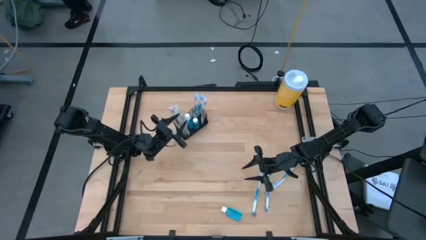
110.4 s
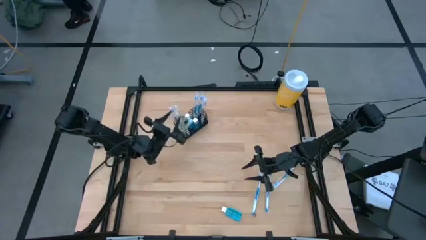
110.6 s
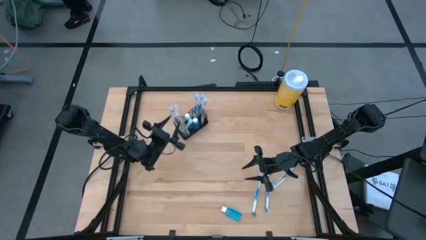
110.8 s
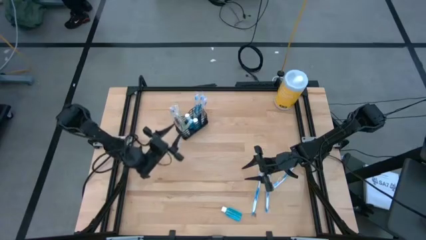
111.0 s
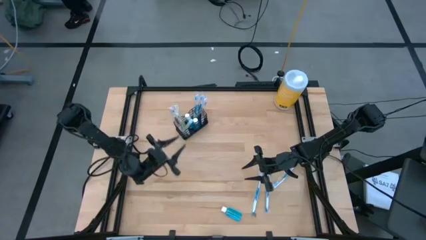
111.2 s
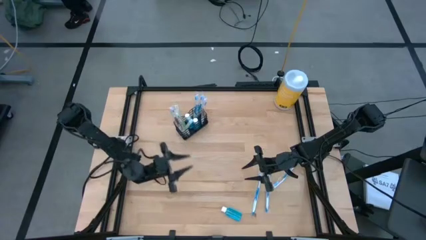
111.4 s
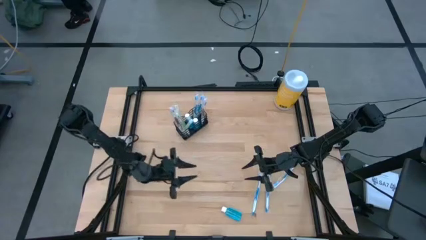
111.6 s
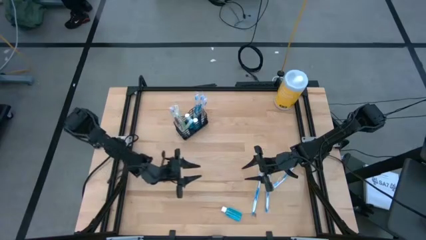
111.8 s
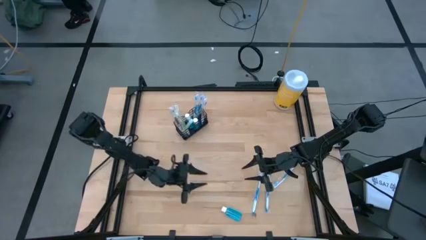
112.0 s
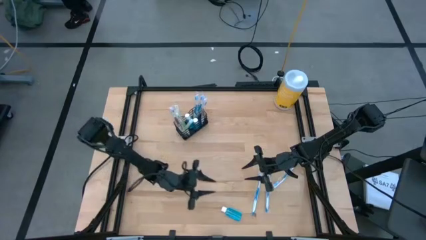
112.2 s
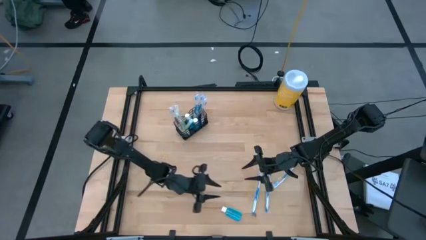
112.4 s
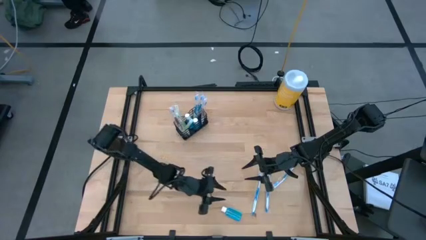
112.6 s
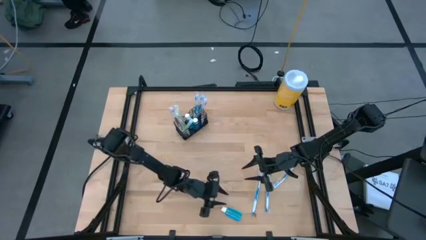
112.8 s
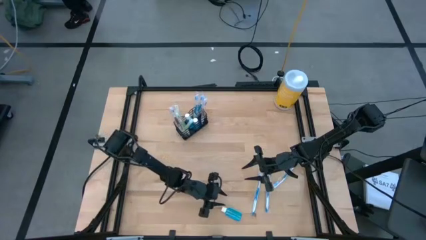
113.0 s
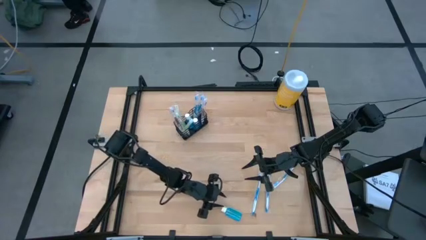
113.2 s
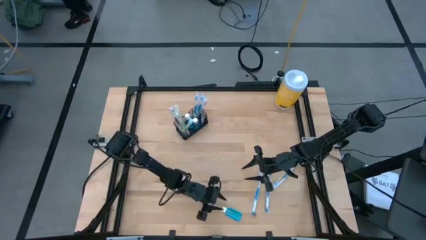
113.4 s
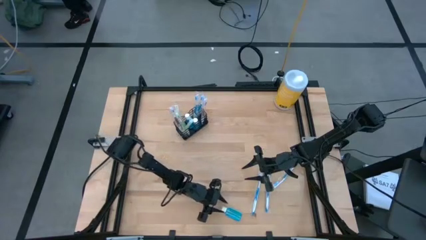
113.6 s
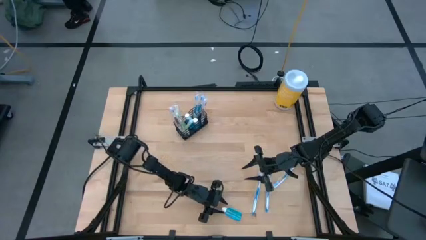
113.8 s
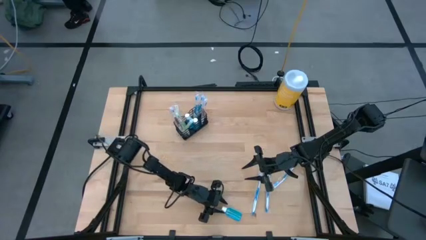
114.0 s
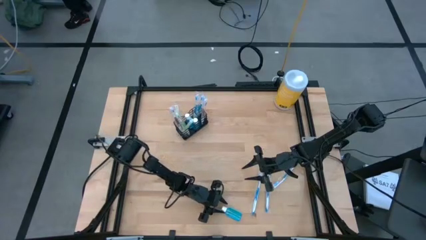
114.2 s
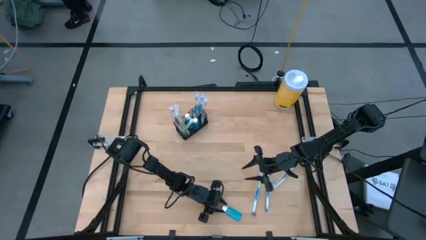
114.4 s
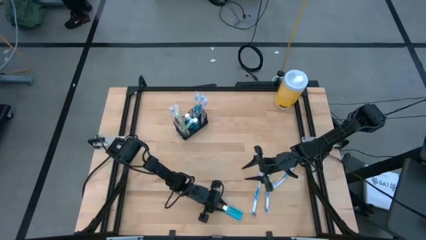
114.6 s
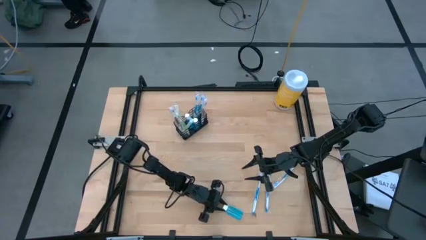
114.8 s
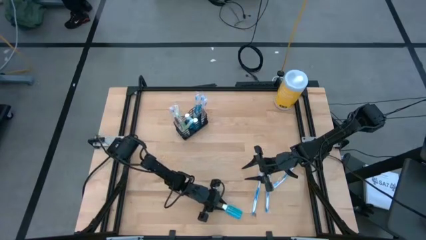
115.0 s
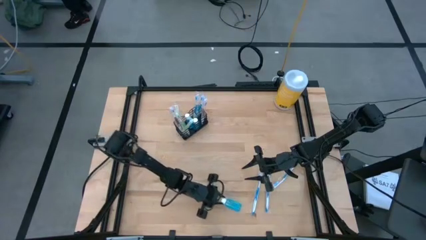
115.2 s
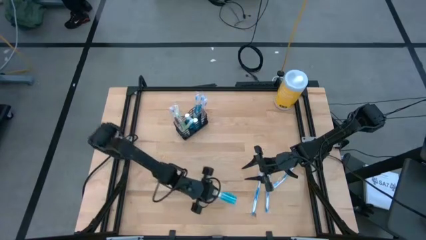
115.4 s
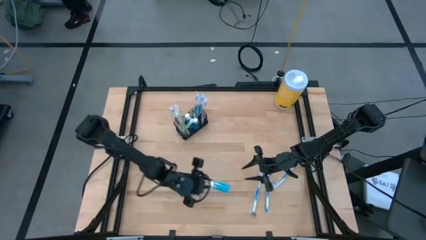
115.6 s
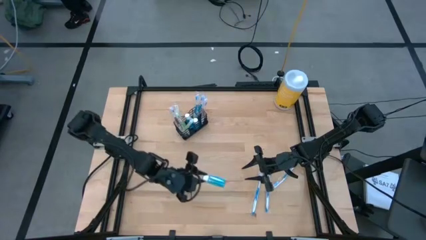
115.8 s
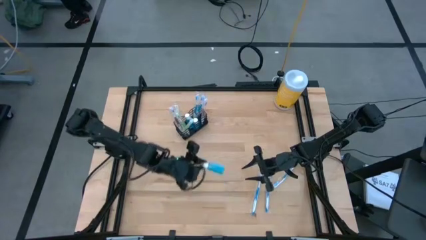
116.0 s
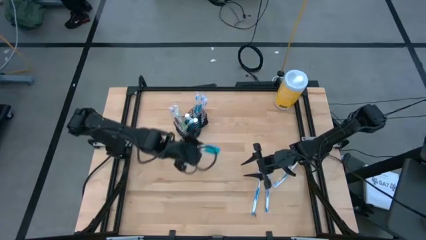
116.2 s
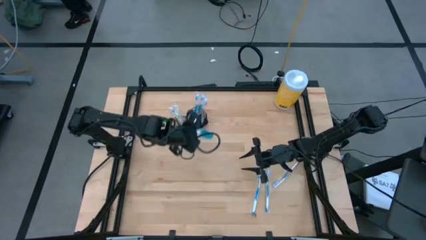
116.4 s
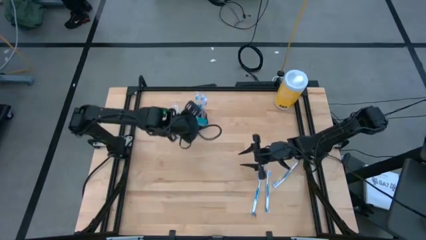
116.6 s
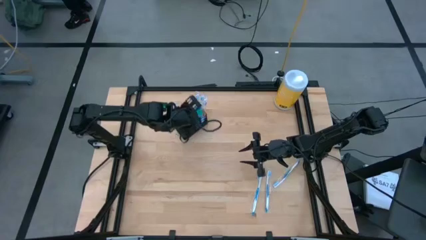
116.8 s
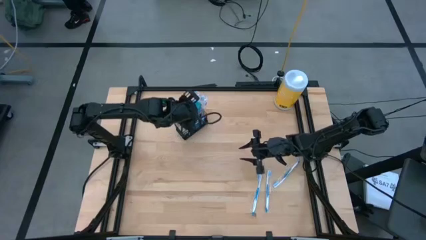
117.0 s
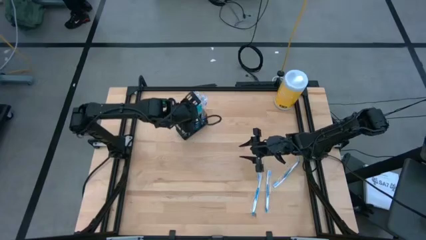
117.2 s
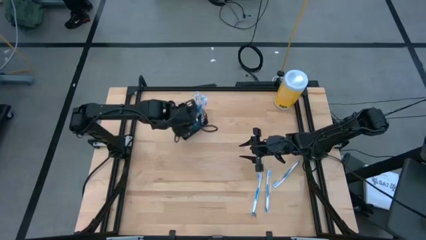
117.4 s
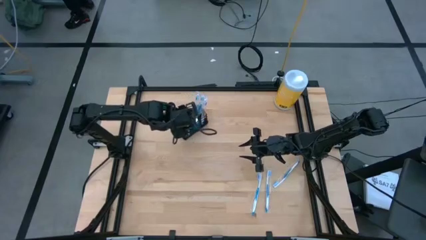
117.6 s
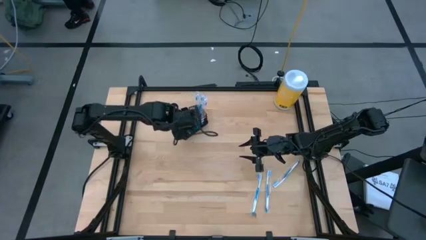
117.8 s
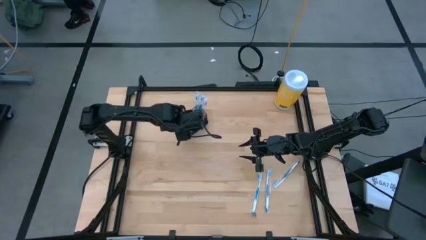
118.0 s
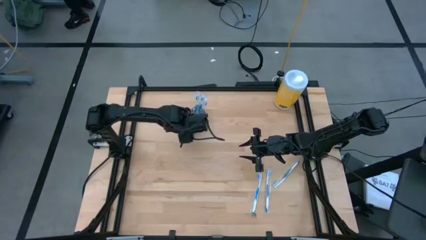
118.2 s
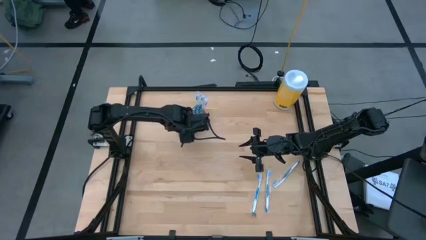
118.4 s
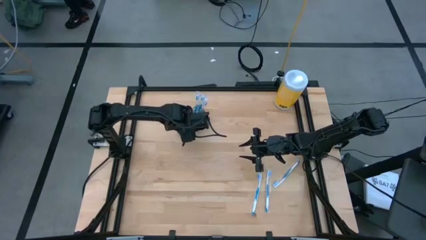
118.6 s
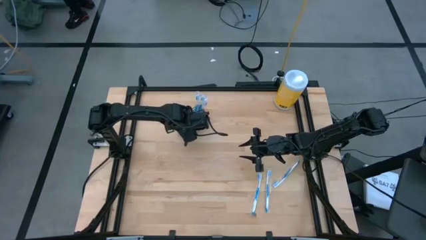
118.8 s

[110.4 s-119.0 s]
Task: Pick & Place toothbrushing station
Put the mouthwash into the black wire organizer

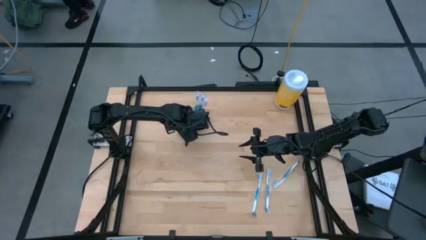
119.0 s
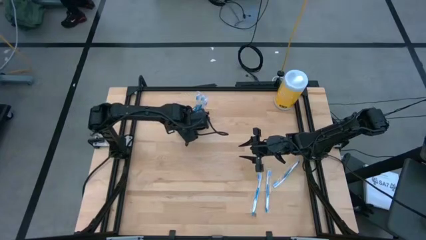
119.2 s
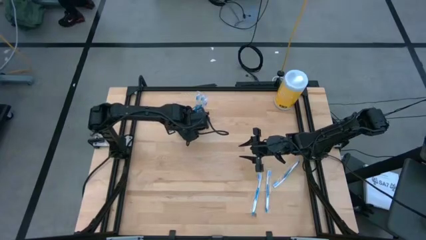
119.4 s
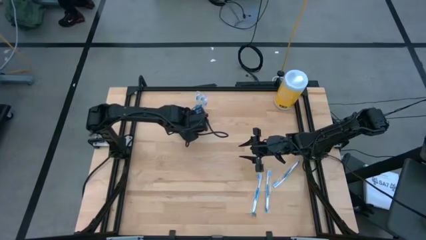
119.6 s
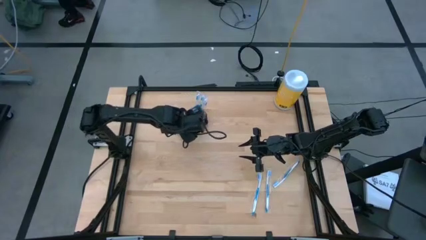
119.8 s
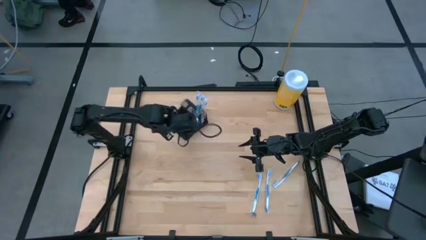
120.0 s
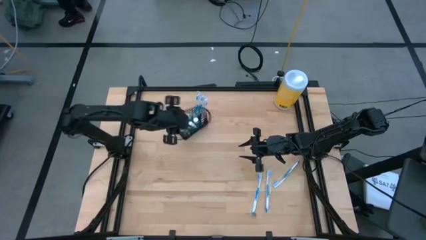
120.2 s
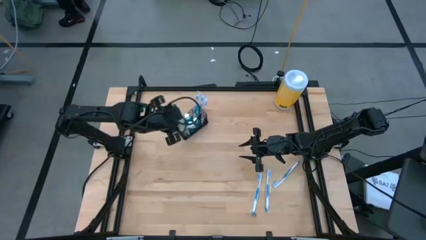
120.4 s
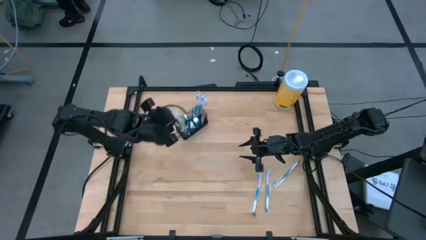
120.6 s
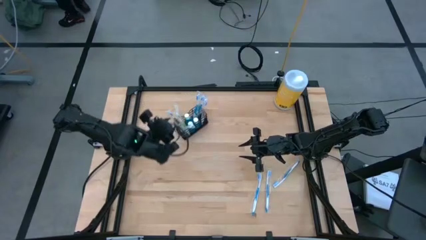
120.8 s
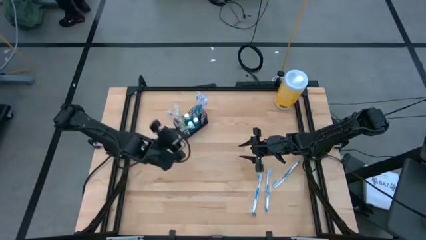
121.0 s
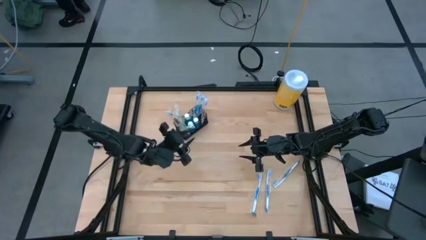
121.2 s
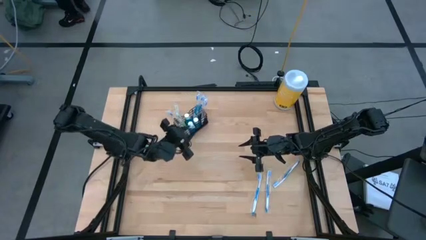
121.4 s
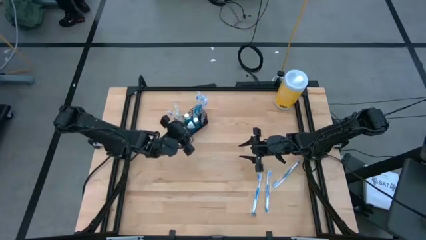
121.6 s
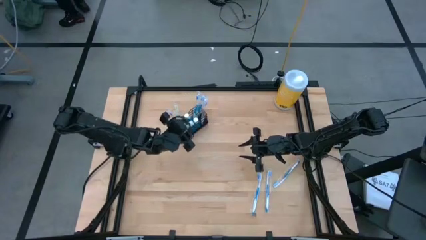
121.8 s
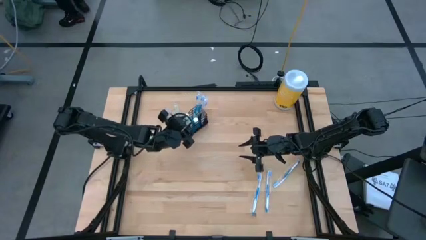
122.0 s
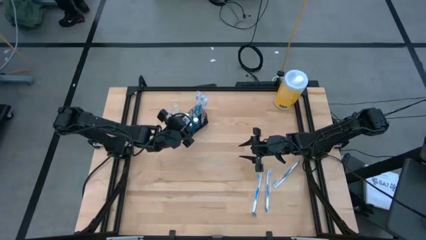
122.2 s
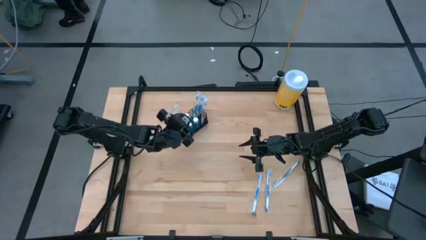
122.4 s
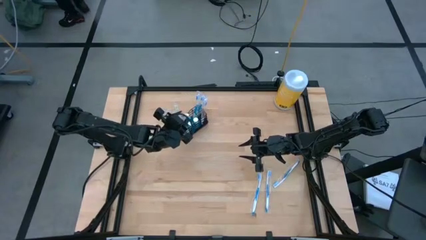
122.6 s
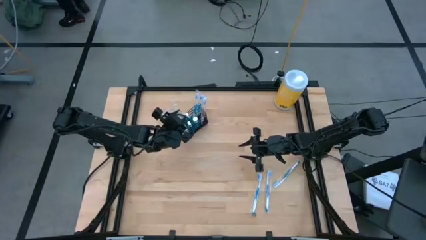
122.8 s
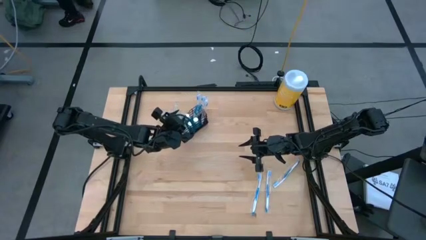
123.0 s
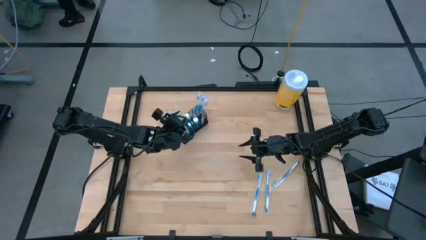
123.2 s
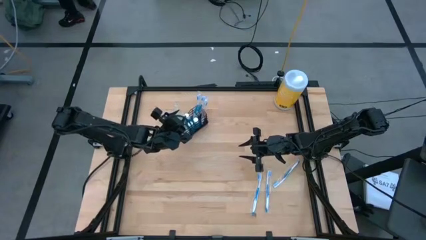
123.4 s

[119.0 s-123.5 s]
Adjust the green toothbrush in the black wire organizer
